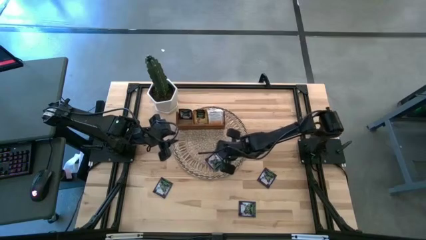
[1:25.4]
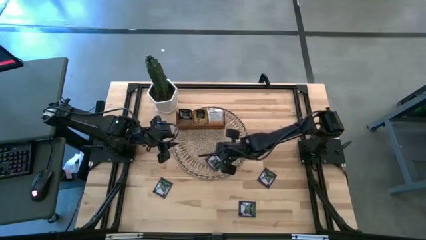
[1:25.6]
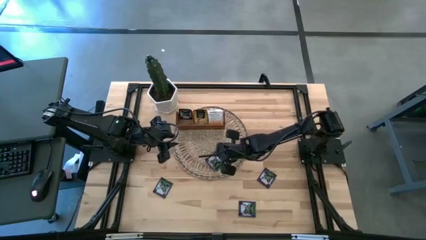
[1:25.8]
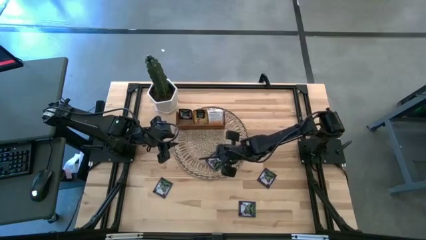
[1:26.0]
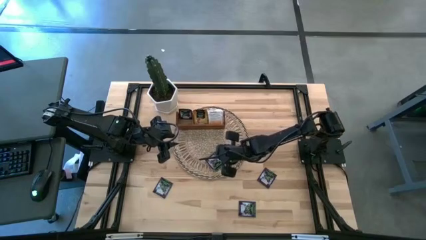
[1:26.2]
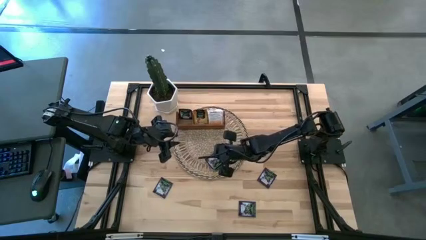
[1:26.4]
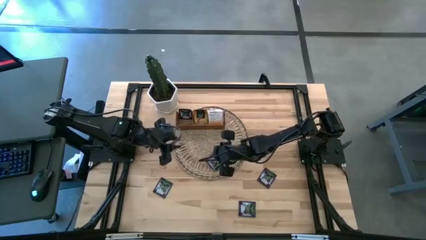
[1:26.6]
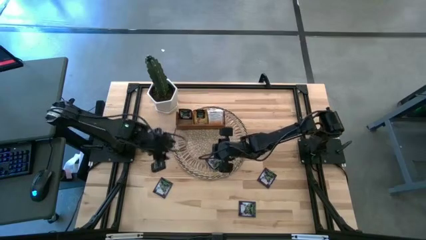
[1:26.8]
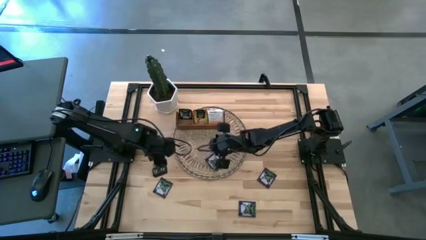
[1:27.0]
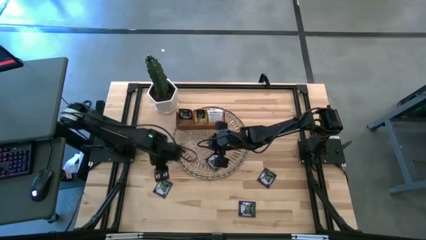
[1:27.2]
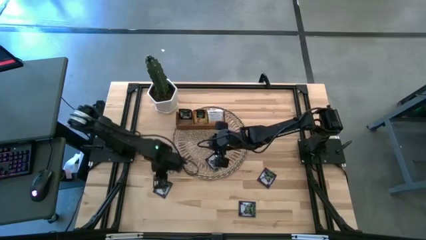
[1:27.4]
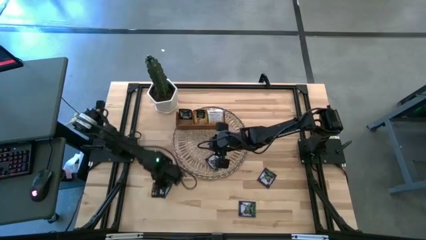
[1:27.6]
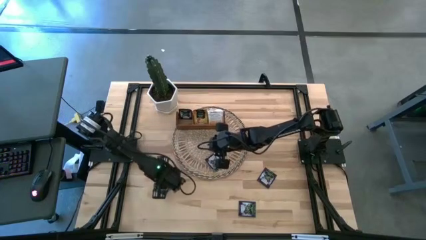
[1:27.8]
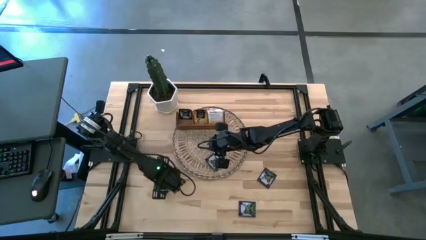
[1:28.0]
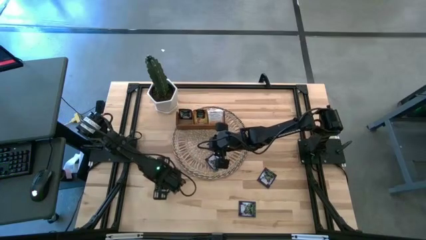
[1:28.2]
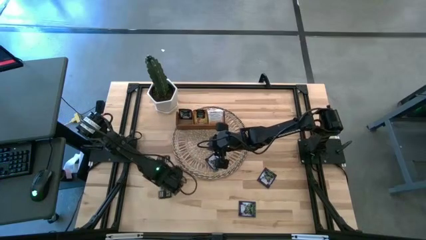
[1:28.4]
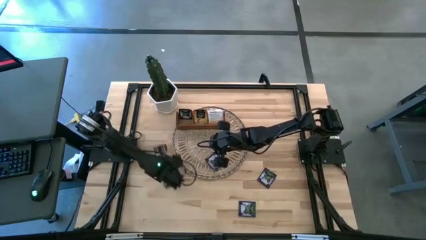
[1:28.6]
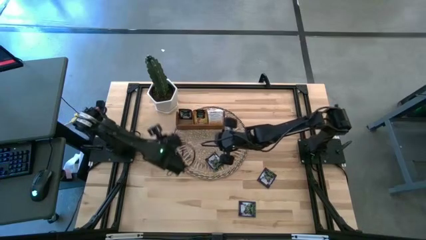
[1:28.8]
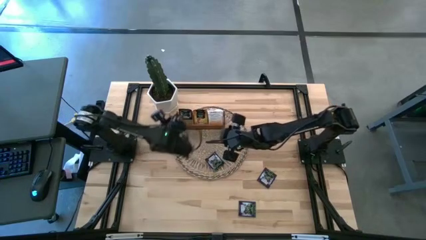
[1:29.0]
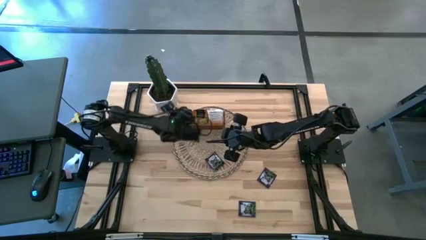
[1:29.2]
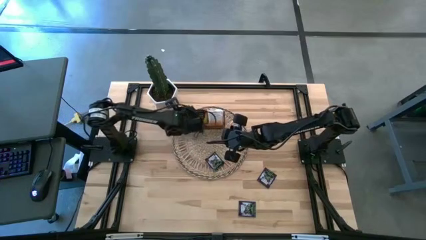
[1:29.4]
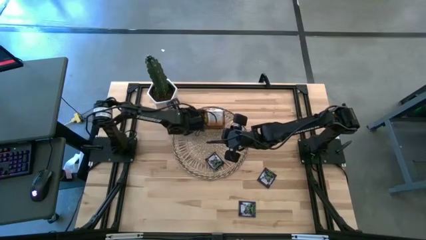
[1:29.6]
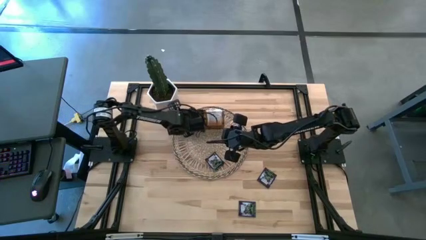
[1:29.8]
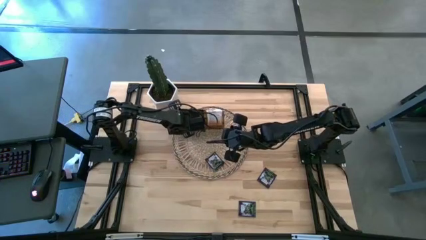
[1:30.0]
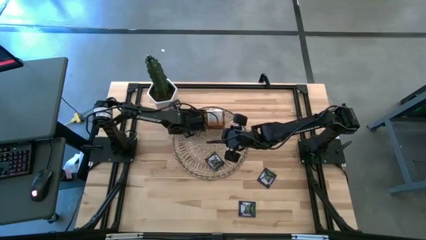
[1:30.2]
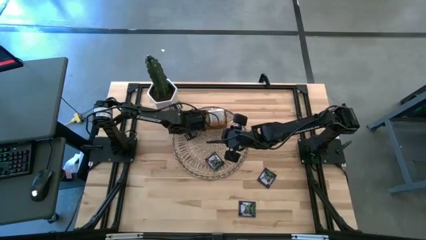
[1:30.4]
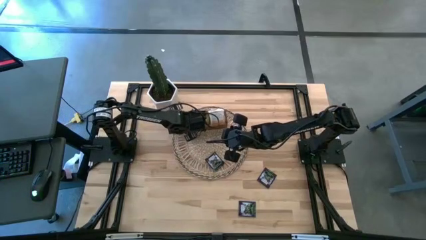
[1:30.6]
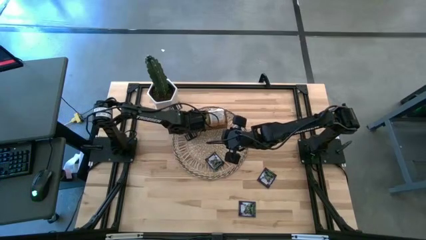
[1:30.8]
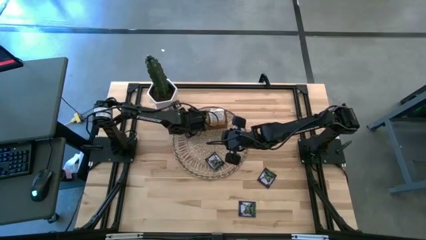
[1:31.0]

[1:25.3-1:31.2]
Task: Pick & Place Tea
Put the black tea bag into the left section of the wooden organizer

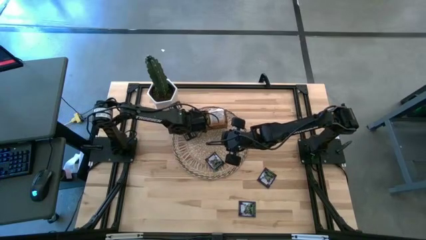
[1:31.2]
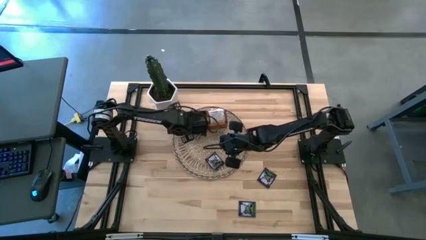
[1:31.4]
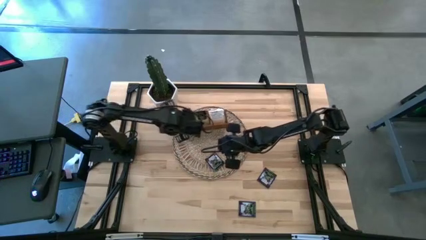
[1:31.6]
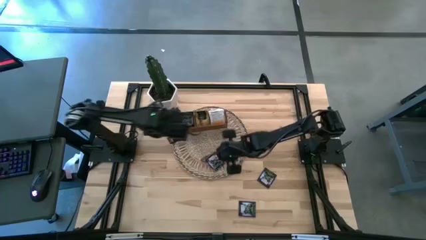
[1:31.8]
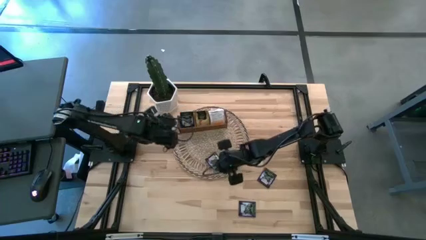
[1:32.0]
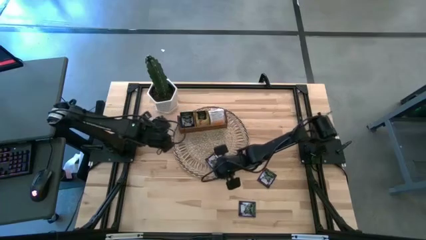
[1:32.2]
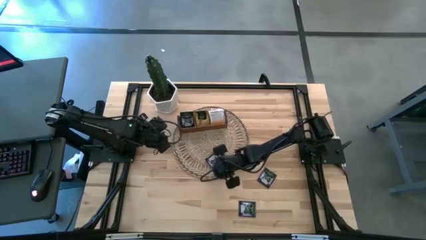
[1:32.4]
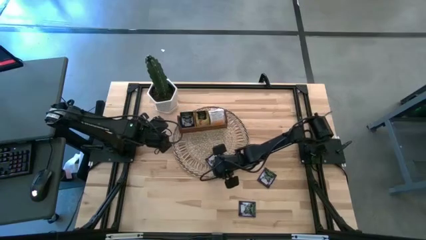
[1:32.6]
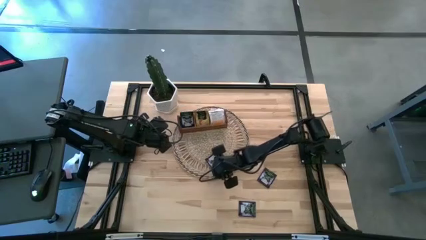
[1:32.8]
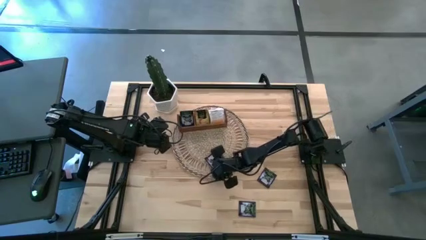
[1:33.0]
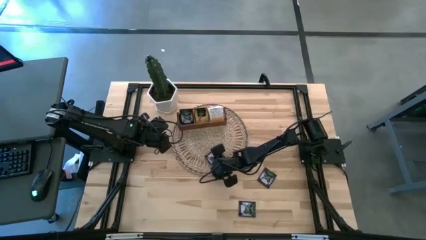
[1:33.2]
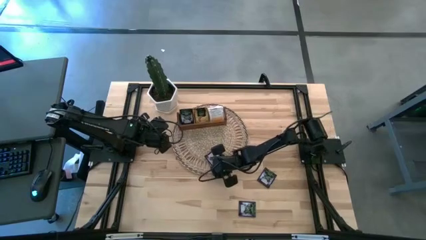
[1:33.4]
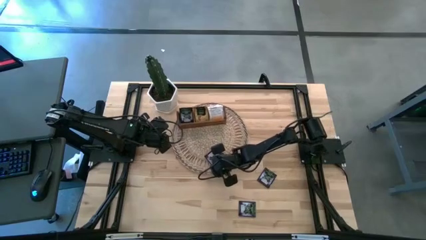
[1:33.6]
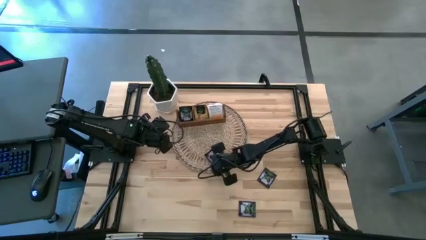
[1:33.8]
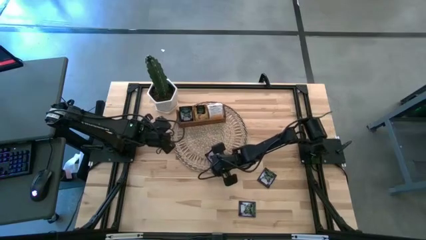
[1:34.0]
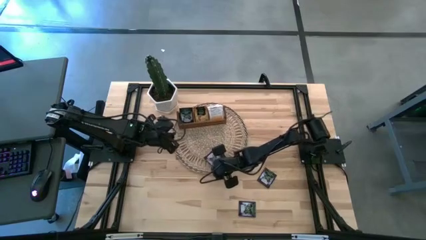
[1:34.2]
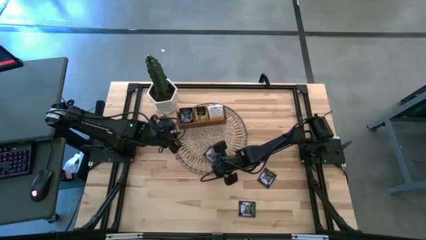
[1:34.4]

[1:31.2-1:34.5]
Put the black tea bag into the left section of the wooden organizer

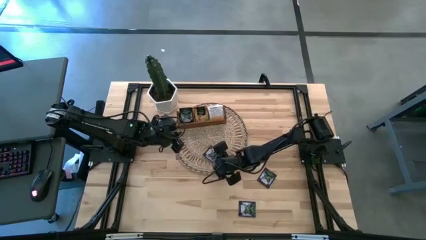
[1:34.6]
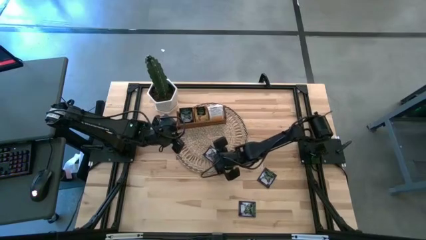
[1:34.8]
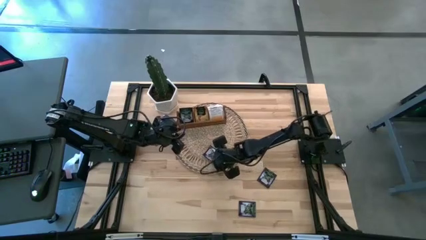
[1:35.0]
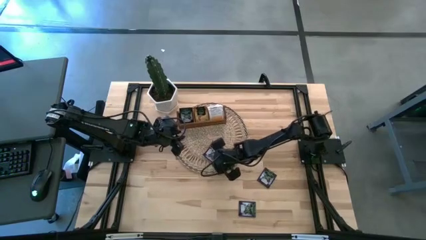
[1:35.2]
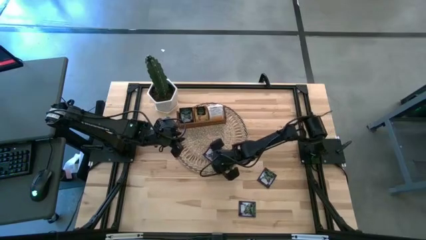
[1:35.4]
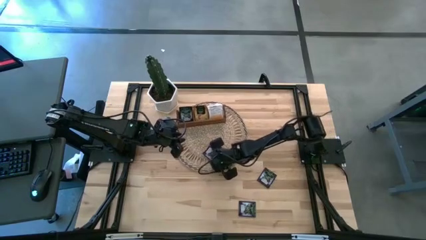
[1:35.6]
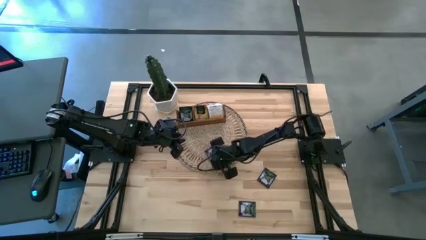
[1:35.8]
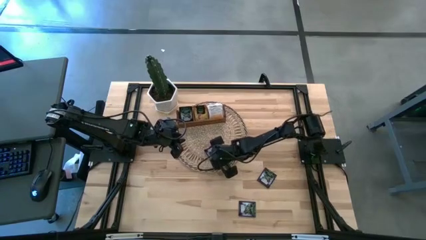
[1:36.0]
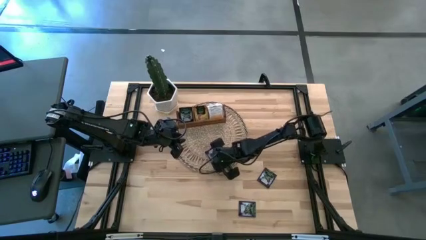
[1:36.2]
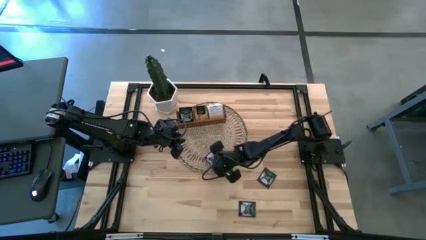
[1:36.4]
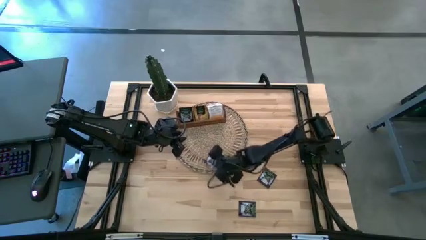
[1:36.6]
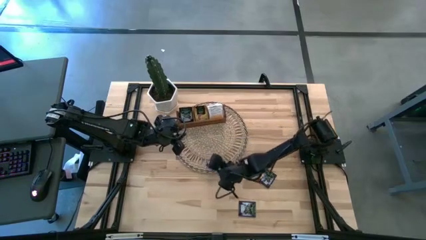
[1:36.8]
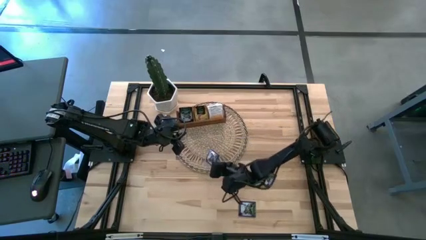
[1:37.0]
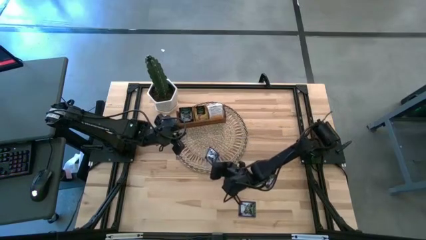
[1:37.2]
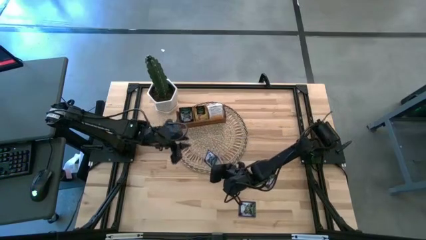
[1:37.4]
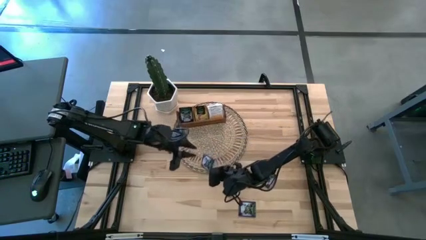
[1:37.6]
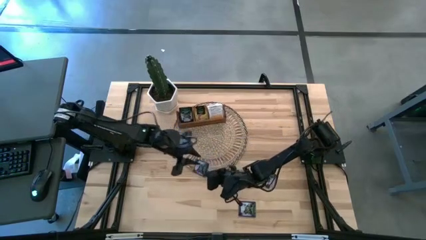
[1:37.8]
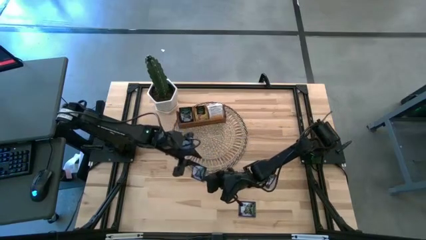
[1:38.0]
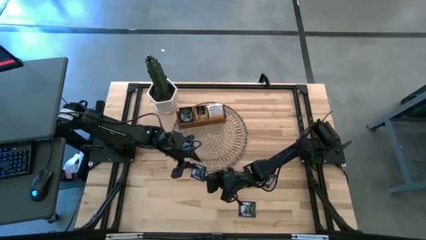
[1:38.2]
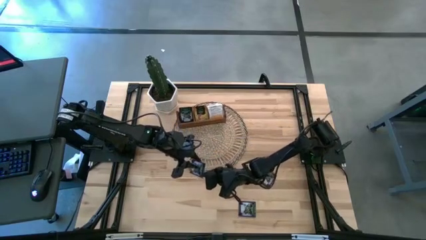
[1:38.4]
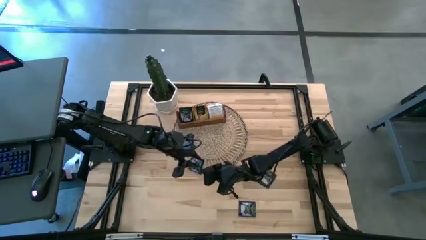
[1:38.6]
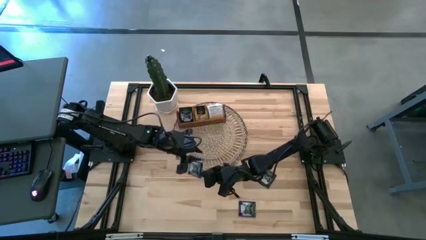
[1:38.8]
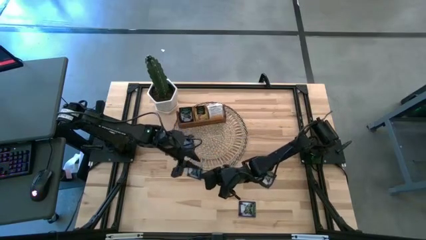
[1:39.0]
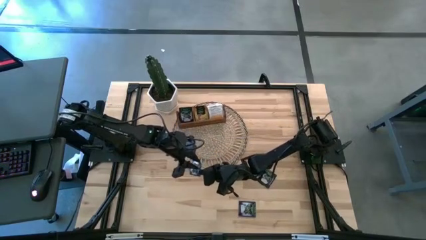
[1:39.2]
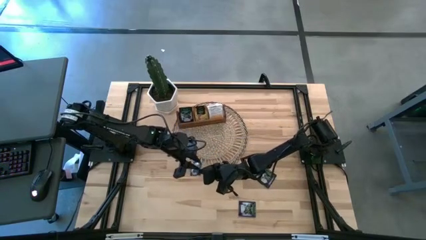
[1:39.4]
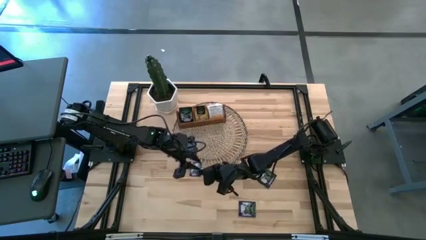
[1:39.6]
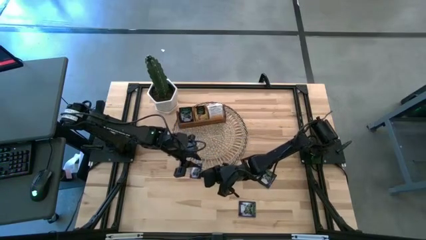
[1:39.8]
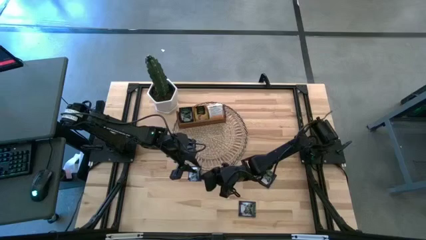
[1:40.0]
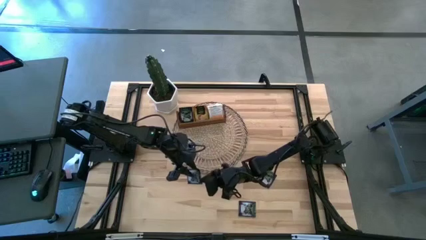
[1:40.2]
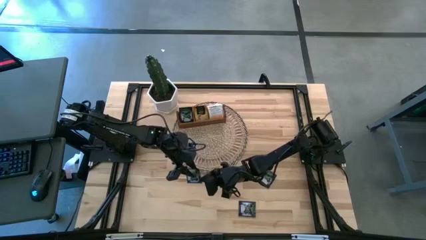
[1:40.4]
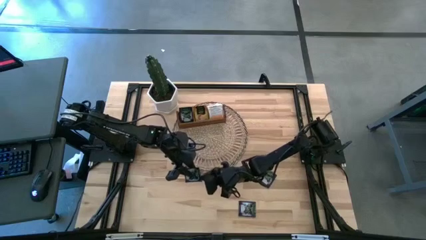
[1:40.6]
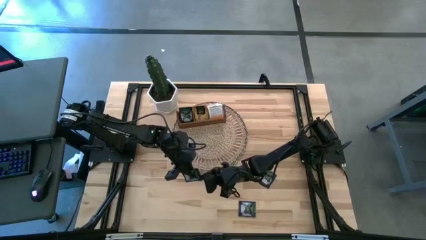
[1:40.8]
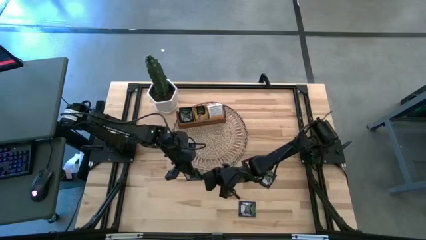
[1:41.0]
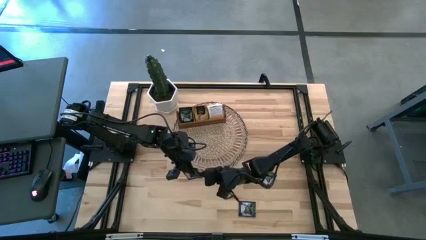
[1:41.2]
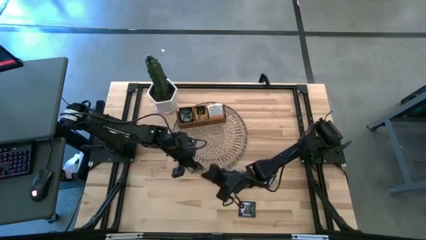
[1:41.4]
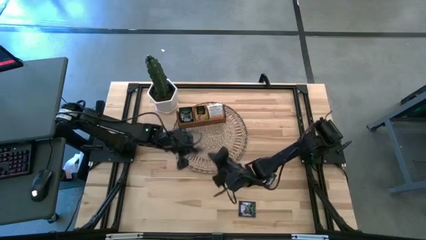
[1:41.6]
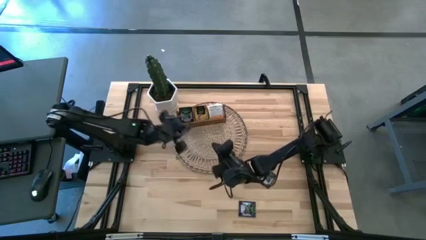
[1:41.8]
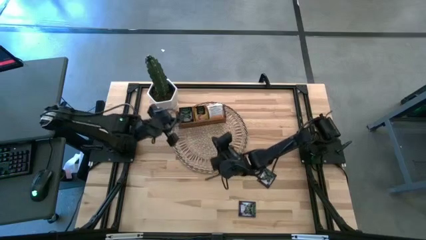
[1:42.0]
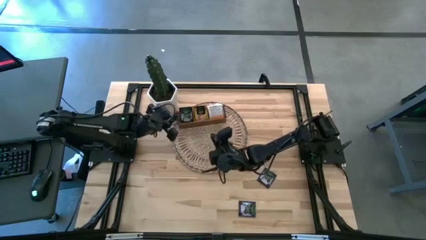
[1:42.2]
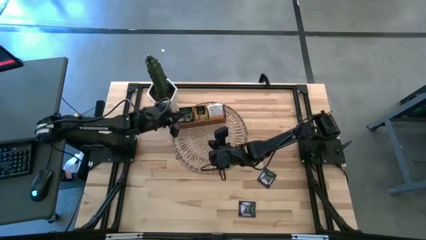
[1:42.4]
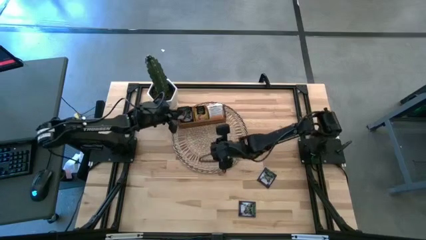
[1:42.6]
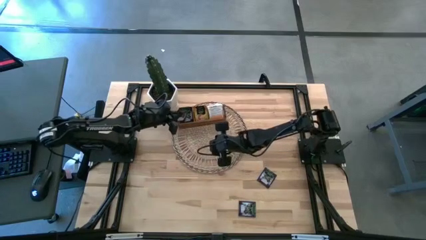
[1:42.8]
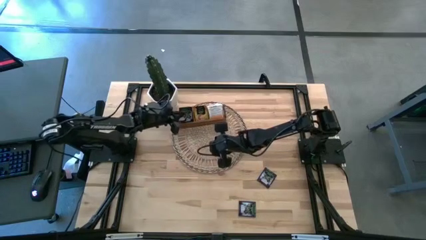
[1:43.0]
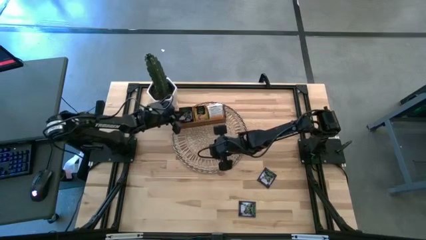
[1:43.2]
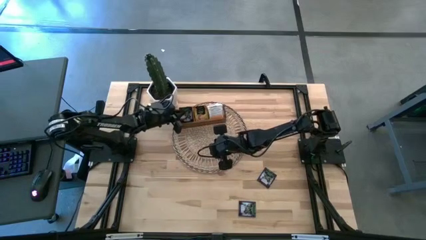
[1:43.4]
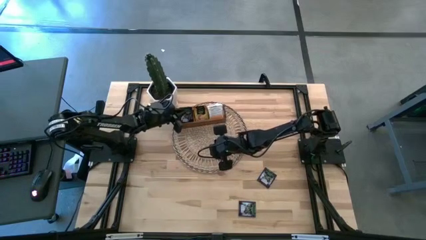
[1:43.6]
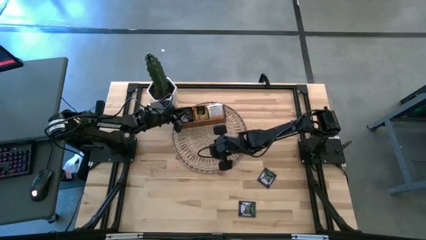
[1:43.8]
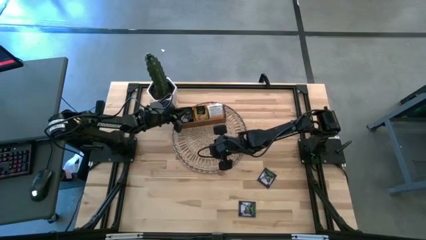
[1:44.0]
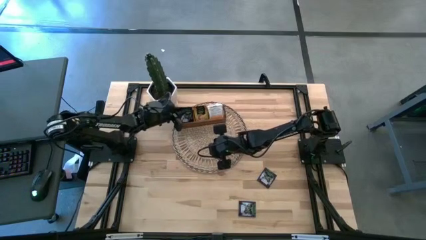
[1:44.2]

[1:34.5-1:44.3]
Put the black tea bag into the left section of the wooden organizer
